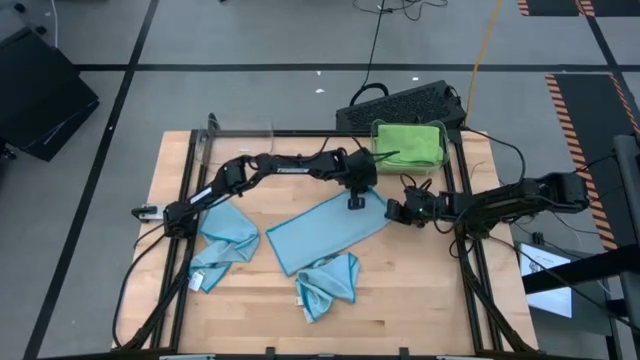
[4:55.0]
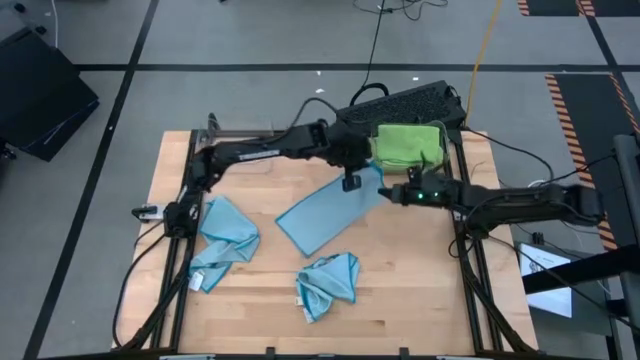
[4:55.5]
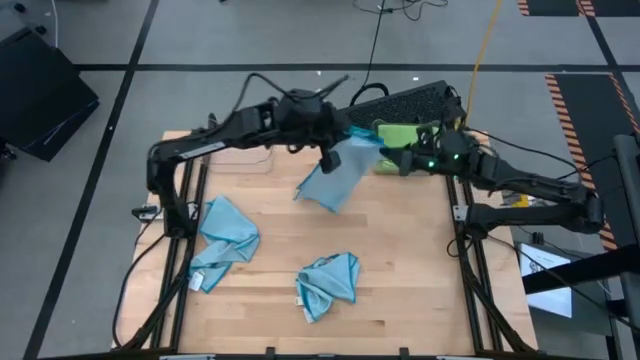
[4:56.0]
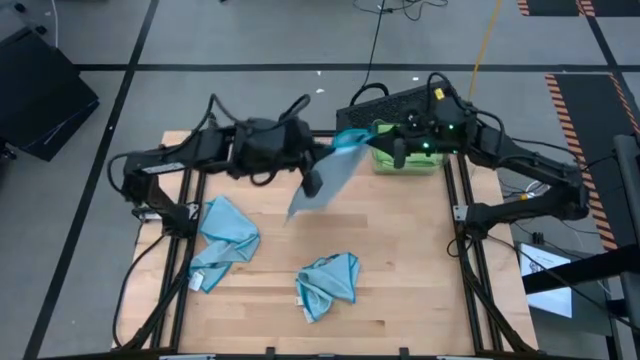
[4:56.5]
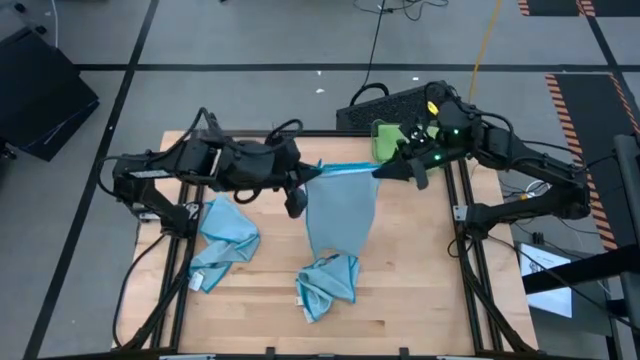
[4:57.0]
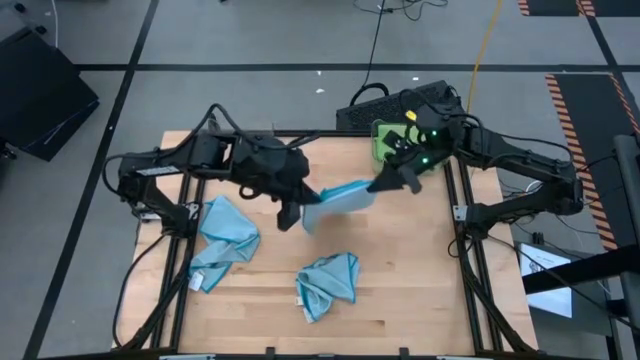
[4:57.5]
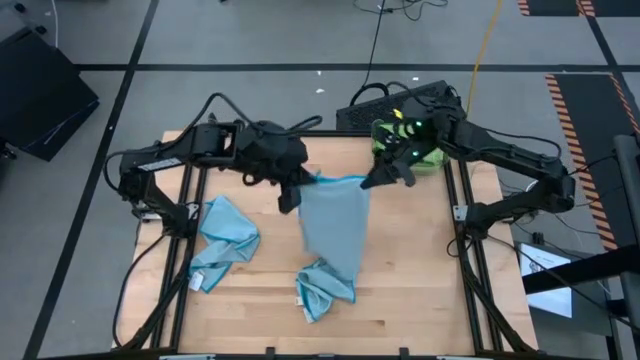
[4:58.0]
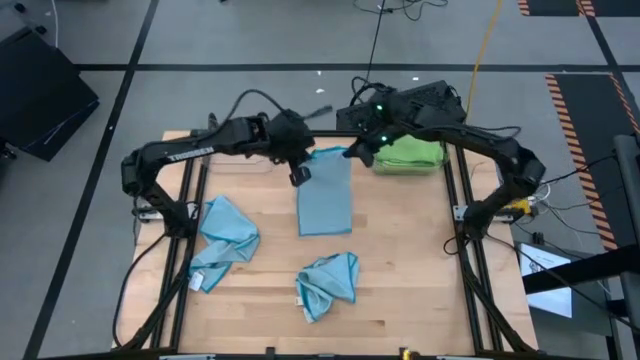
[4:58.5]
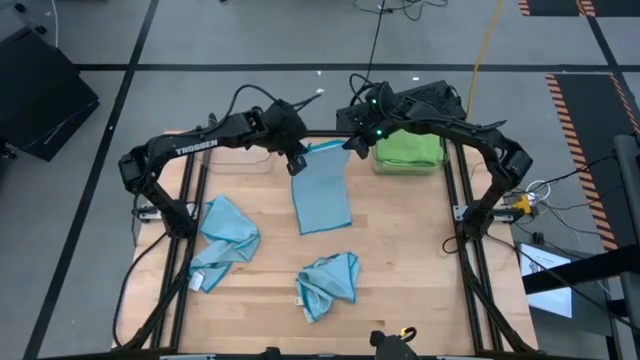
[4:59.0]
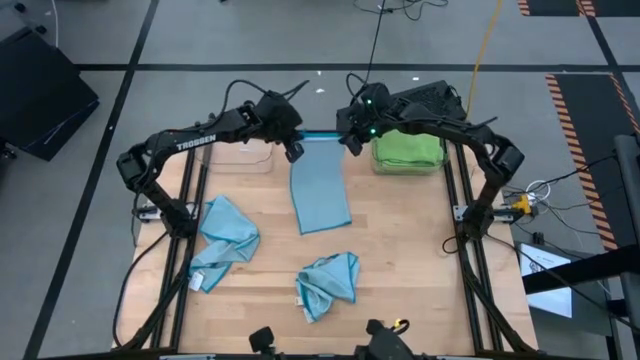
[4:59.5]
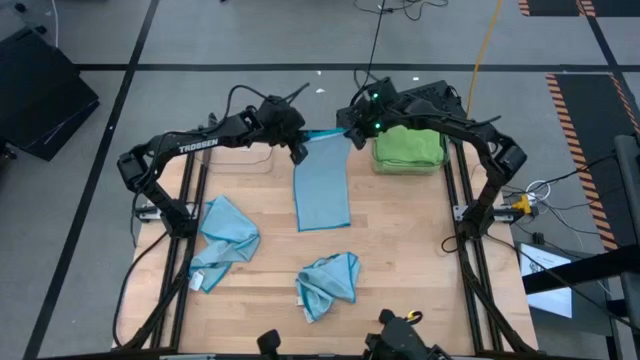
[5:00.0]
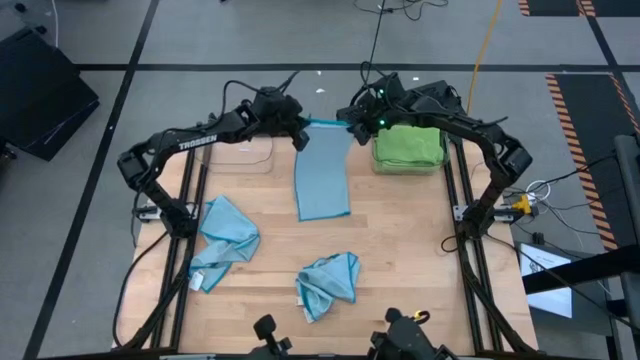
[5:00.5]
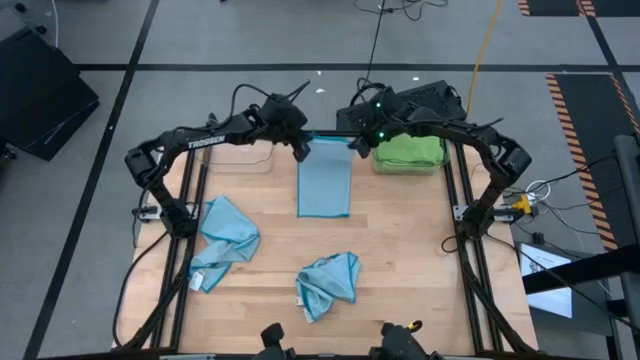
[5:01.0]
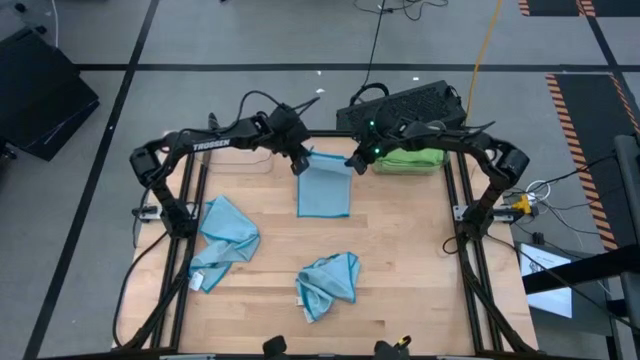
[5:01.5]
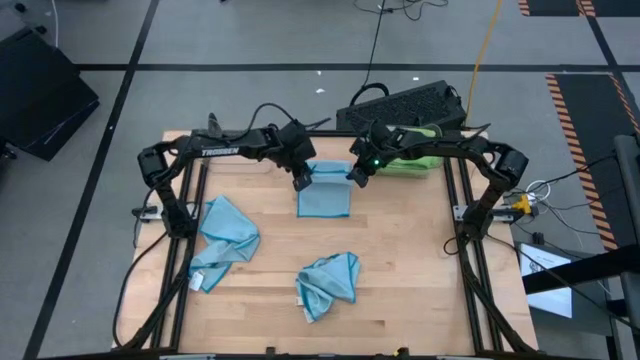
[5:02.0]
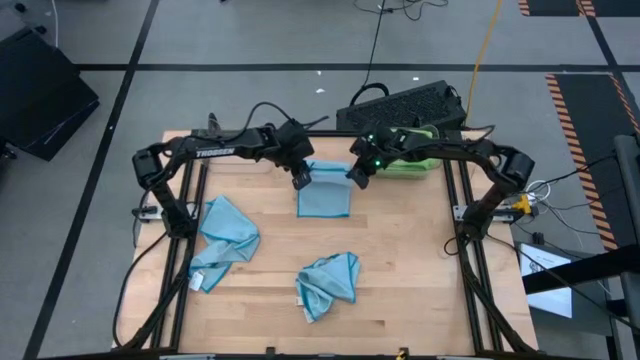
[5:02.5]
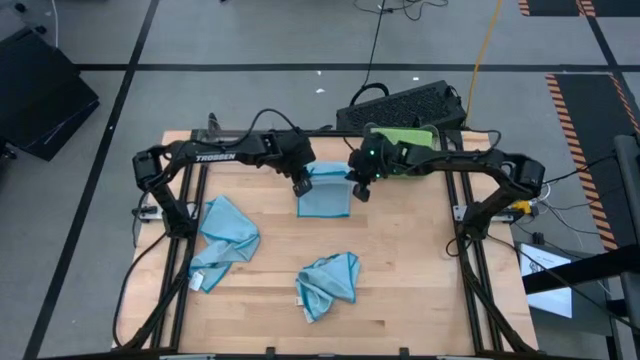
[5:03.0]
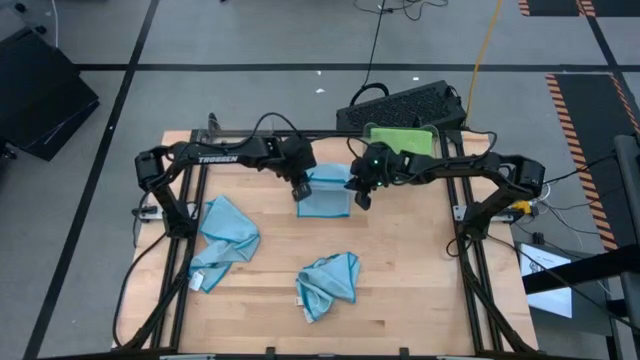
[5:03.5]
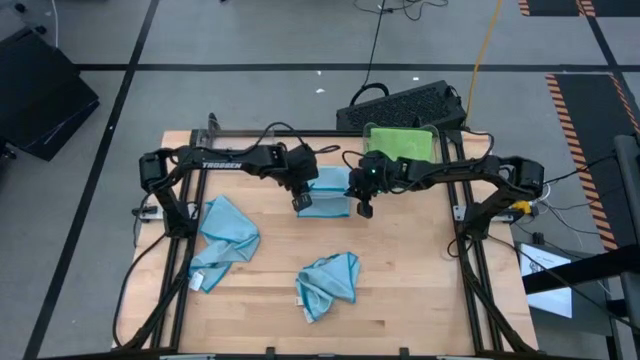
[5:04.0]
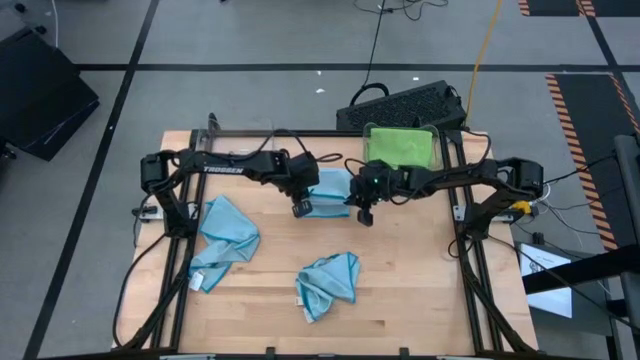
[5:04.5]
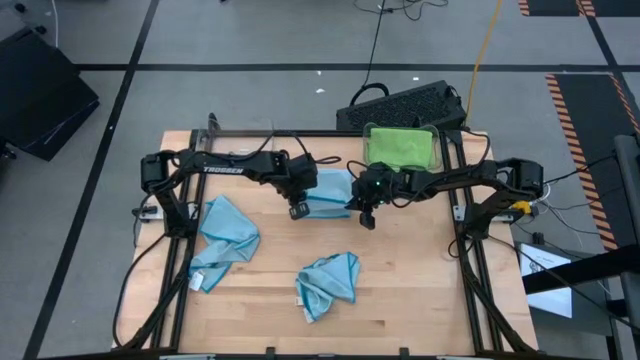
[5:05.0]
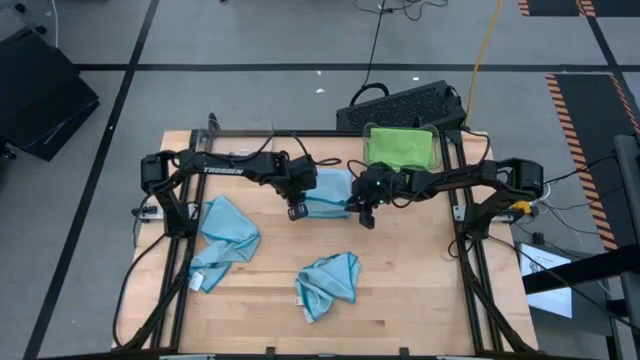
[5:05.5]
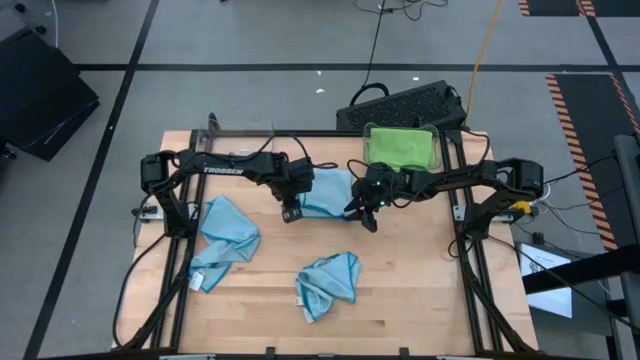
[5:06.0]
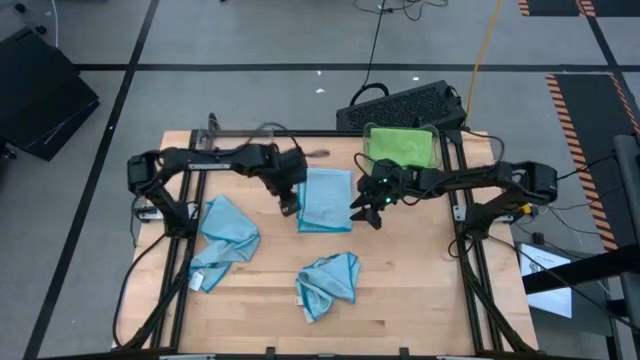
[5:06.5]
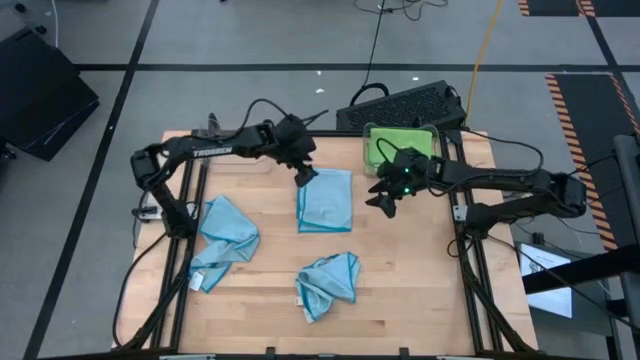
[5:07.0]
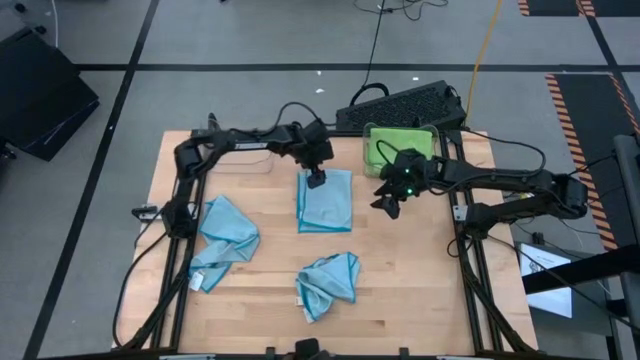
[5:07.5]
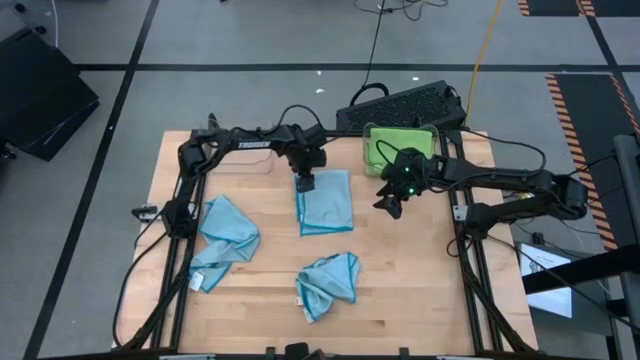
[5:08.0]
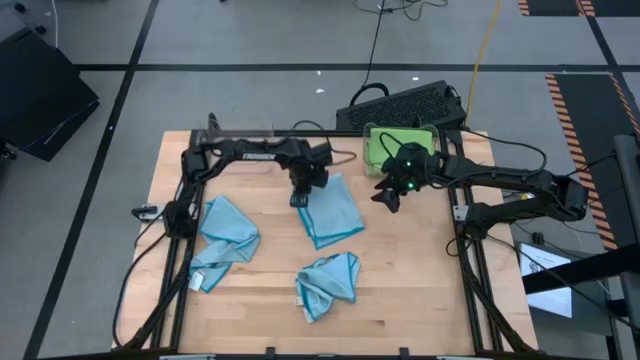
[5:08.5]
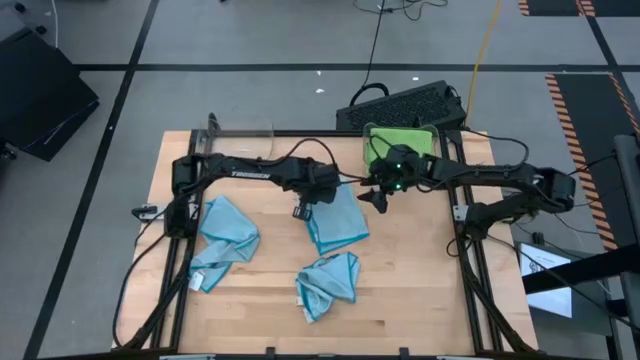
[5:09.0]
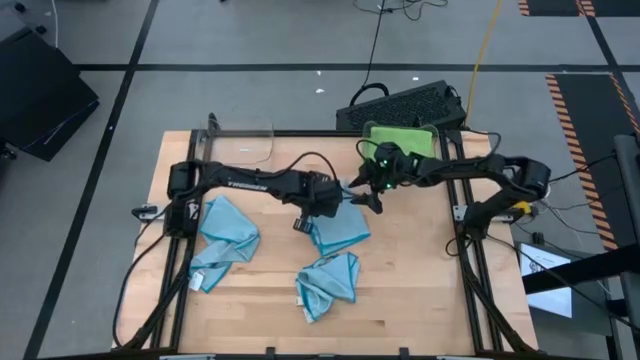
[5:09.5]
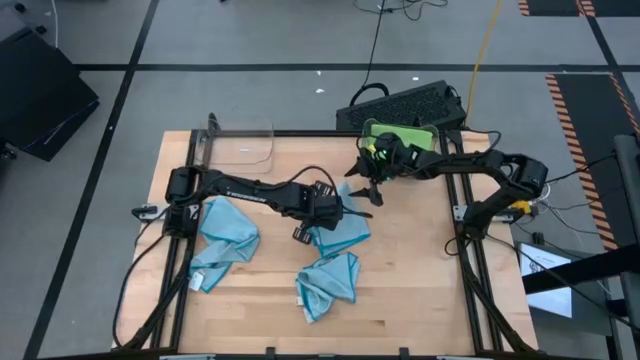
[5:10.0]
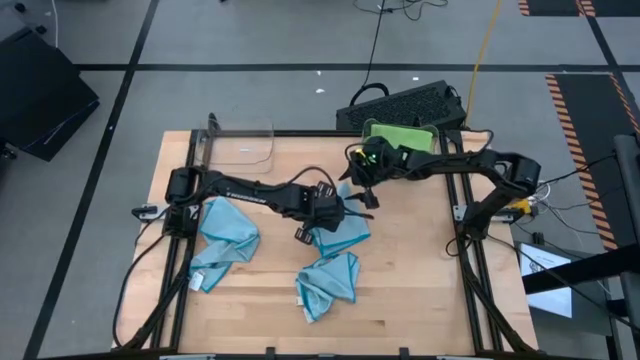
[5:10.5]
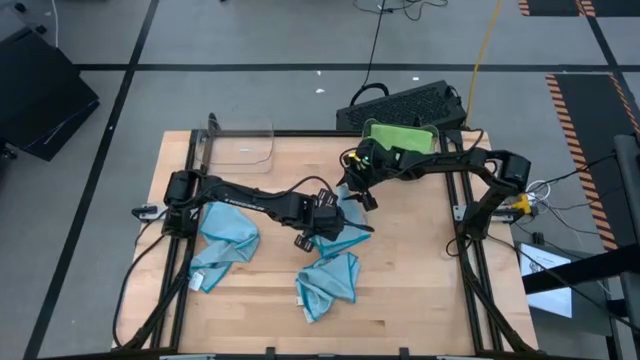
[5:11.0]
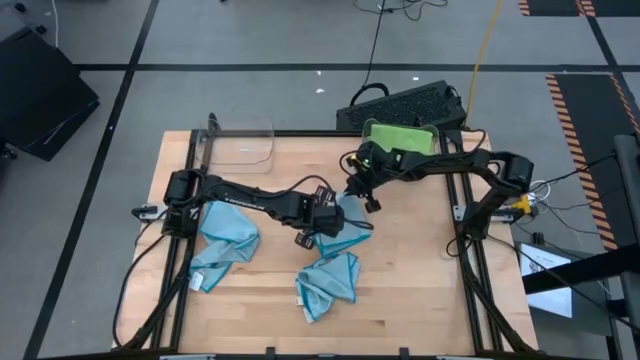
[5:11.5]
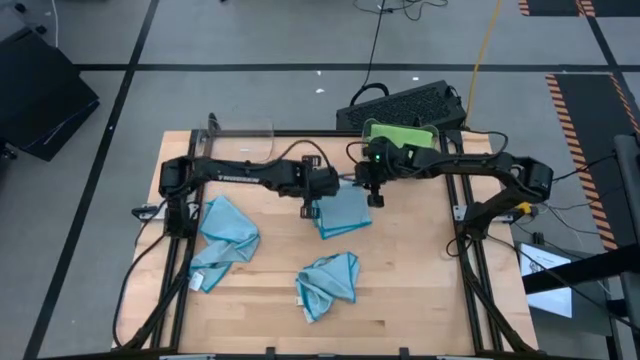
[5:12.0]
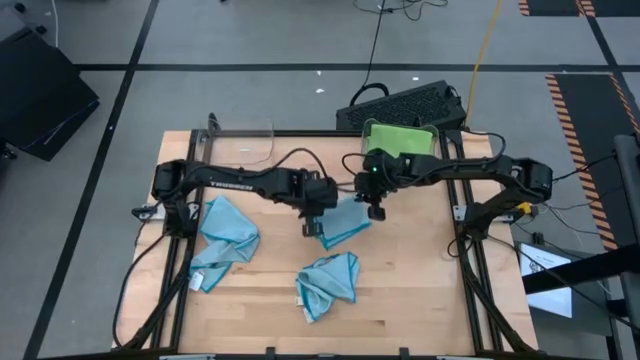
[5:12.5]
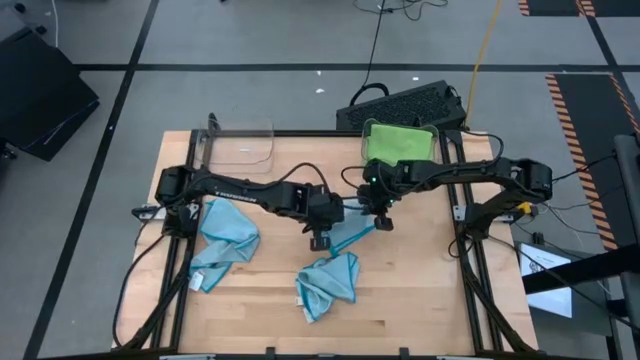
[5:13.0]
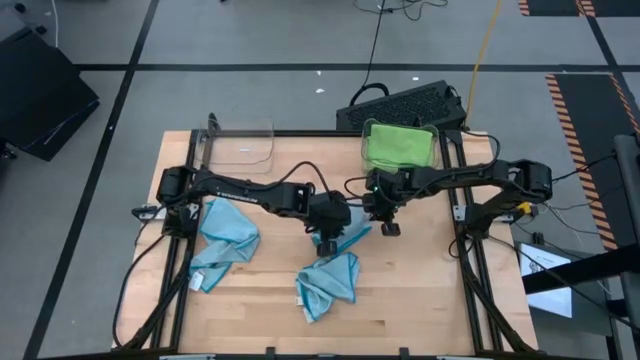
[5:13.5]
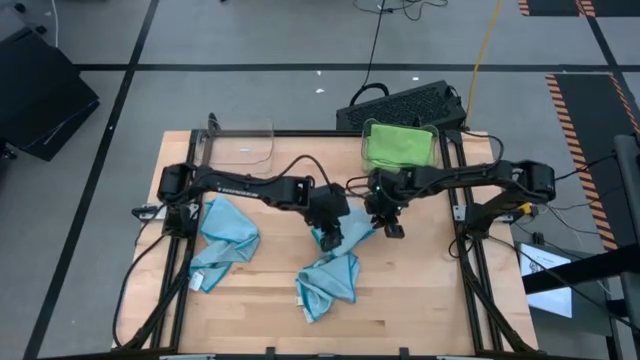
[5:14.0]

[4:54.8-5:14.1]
Task: Sort microfiber towel by color & place in baskets
Fold the top blue towel

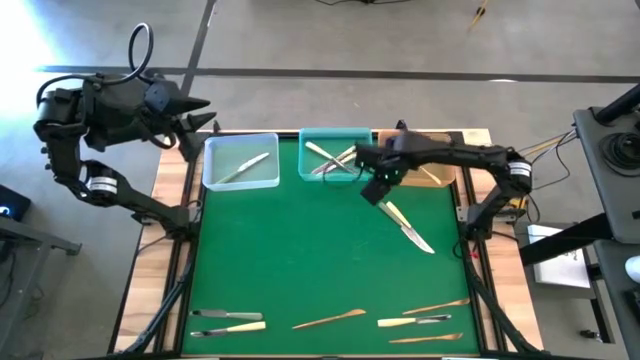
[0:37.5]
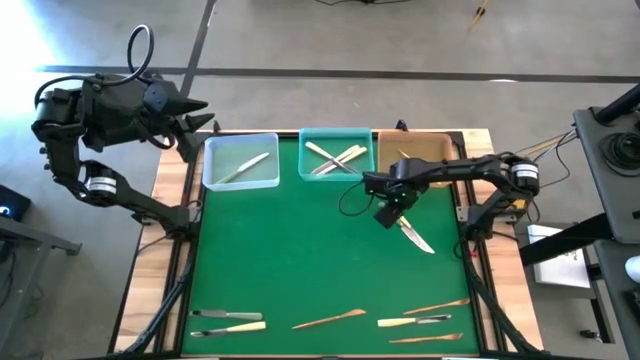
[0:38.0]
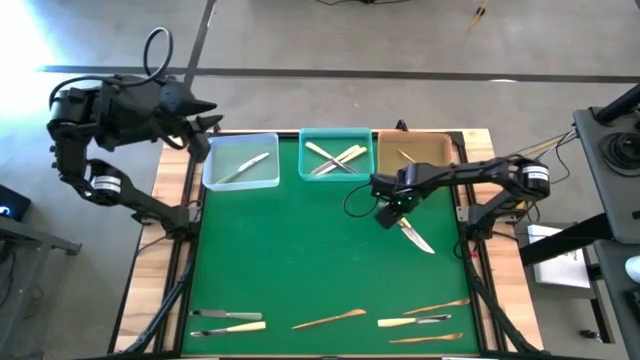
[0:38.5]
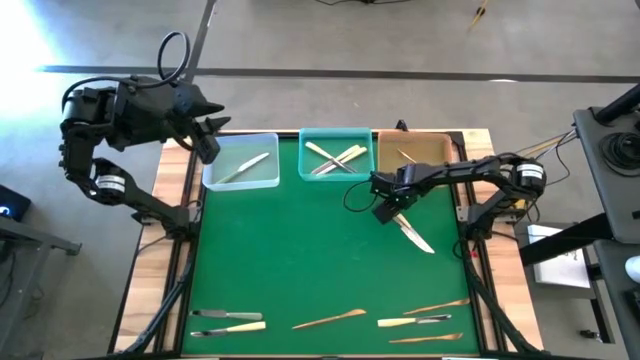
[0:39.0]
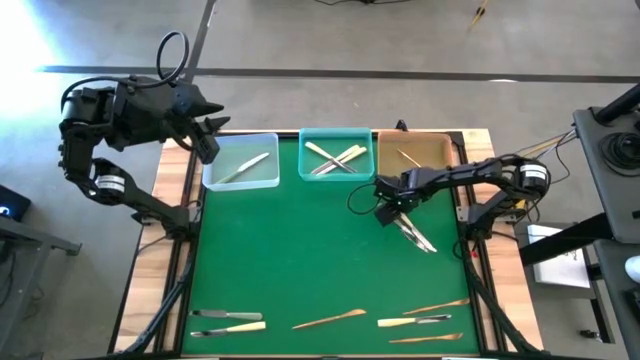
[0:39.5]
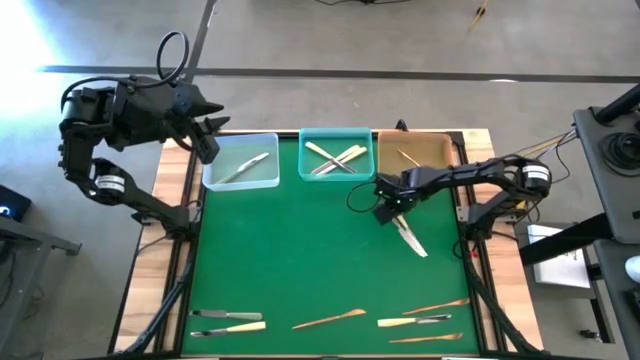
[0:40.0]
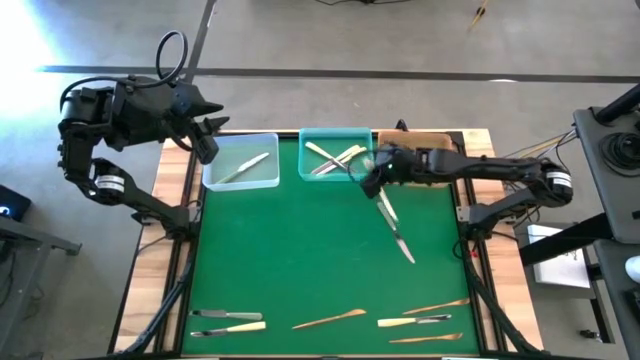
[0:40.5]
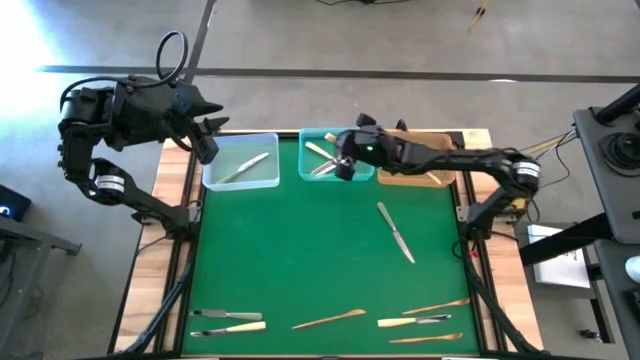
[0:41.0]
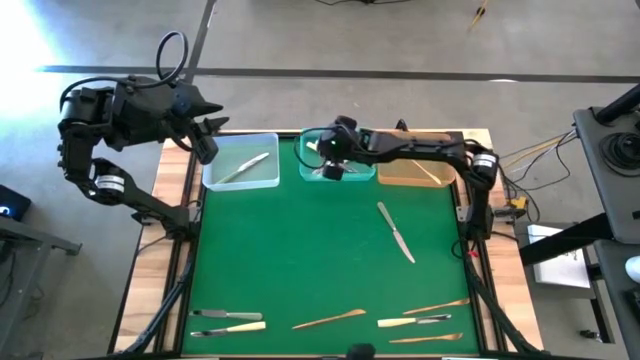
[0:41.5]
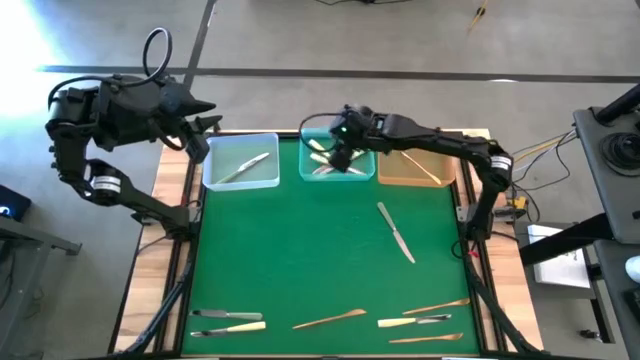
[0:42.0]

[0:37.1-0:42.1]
Task: Sort silverware by color (type)
Put the top right gold and silver knife into the blue bin
